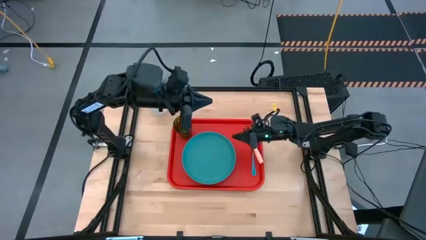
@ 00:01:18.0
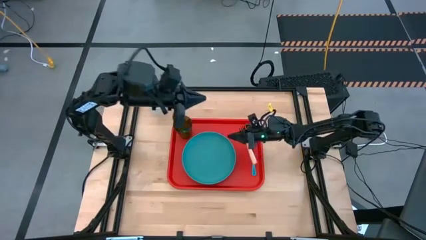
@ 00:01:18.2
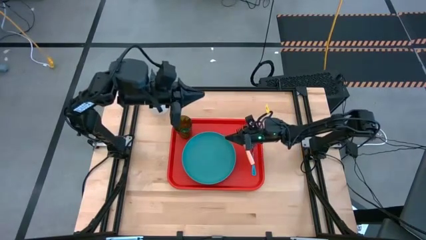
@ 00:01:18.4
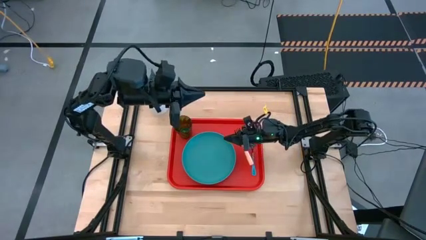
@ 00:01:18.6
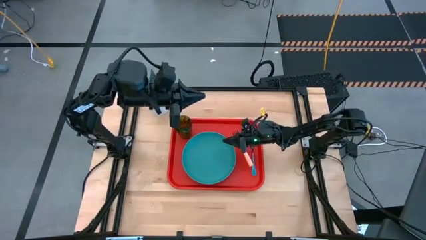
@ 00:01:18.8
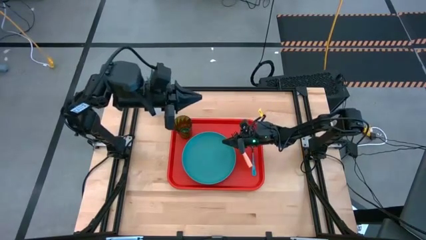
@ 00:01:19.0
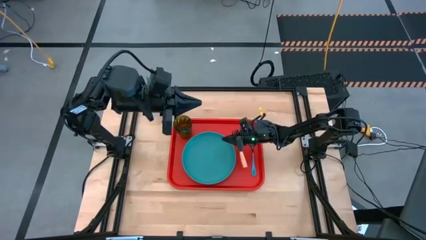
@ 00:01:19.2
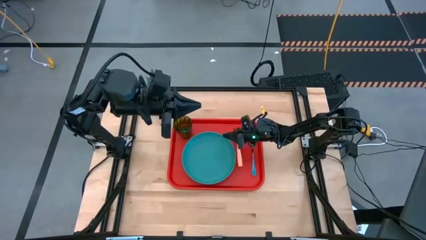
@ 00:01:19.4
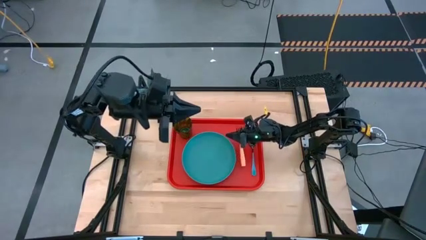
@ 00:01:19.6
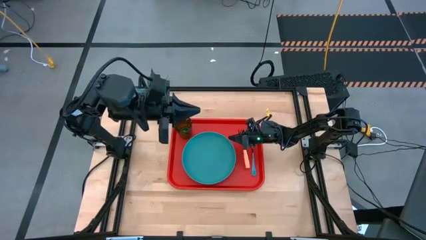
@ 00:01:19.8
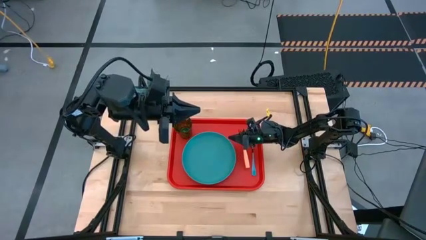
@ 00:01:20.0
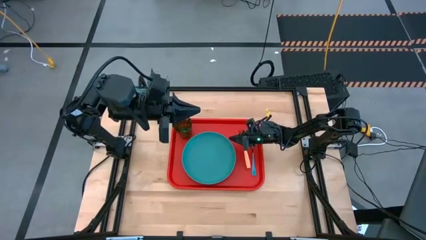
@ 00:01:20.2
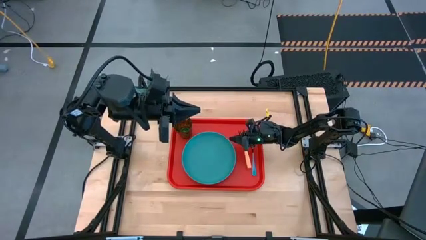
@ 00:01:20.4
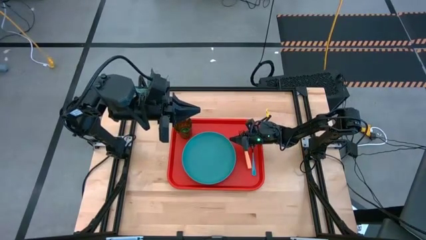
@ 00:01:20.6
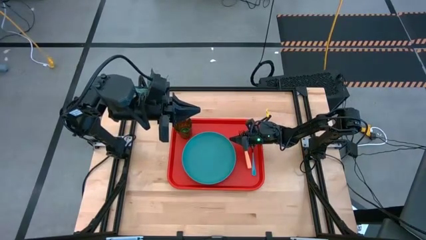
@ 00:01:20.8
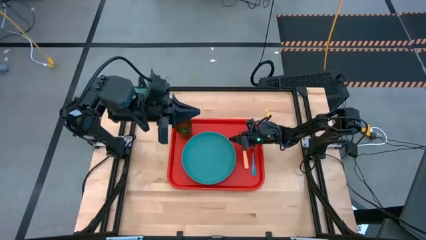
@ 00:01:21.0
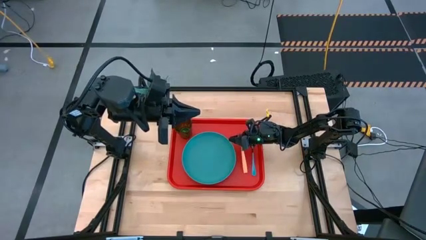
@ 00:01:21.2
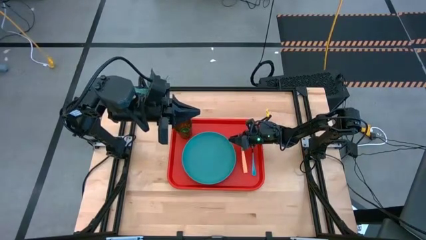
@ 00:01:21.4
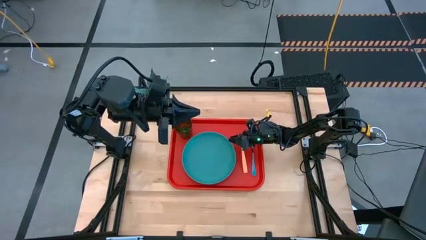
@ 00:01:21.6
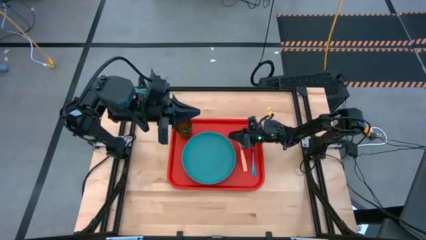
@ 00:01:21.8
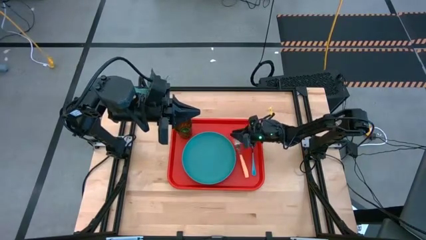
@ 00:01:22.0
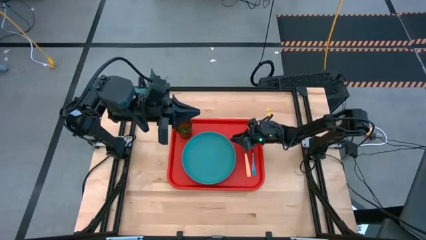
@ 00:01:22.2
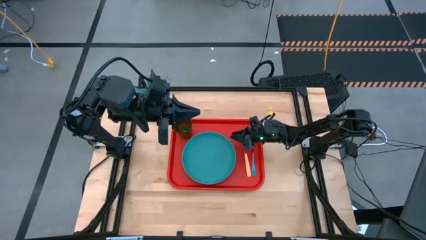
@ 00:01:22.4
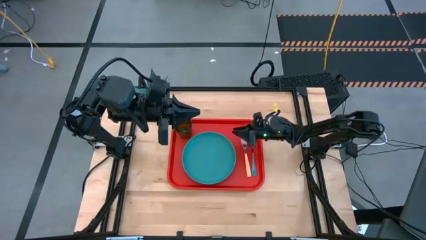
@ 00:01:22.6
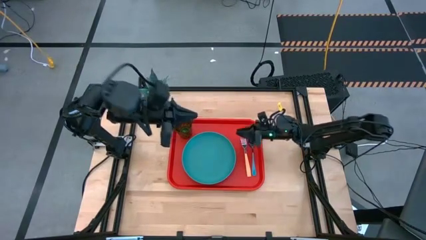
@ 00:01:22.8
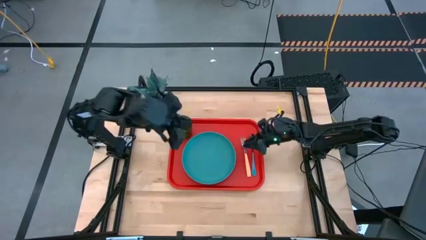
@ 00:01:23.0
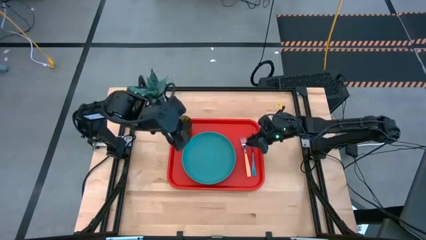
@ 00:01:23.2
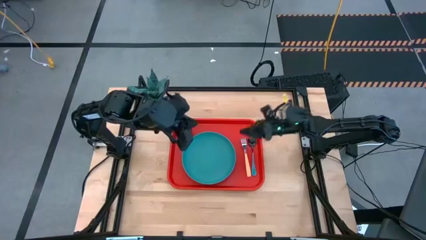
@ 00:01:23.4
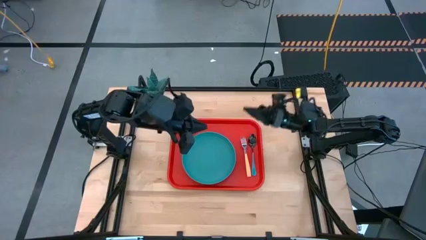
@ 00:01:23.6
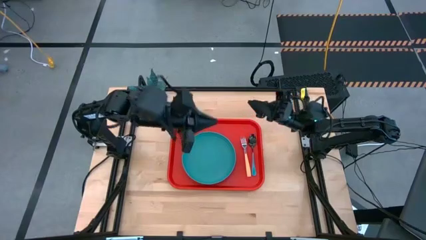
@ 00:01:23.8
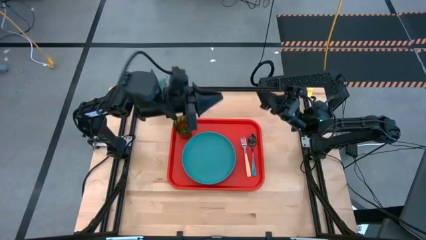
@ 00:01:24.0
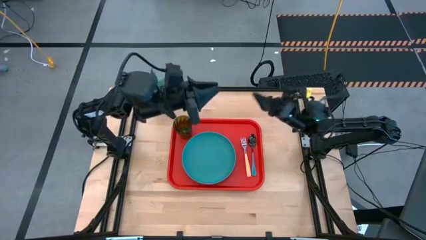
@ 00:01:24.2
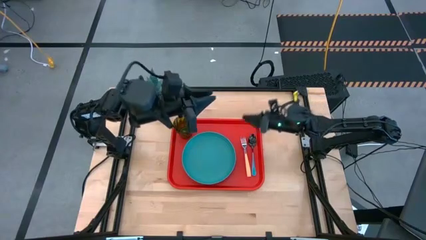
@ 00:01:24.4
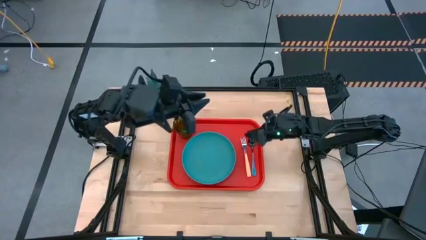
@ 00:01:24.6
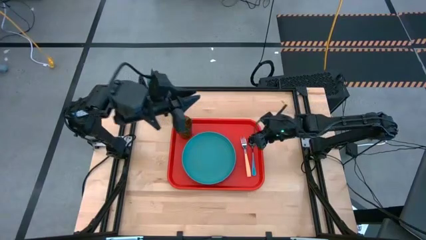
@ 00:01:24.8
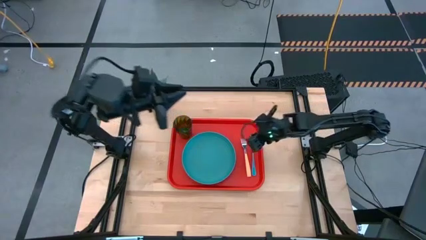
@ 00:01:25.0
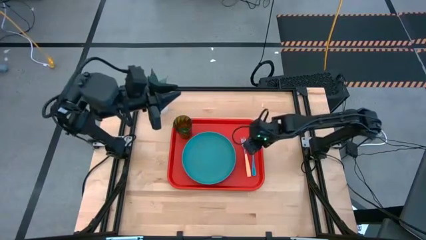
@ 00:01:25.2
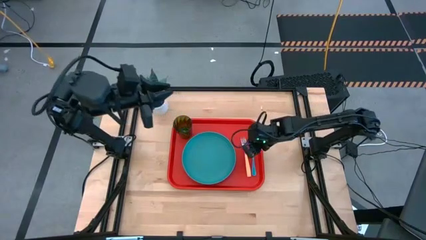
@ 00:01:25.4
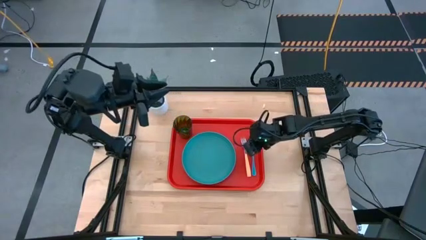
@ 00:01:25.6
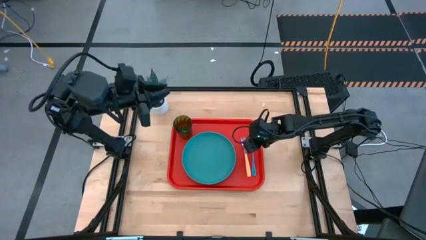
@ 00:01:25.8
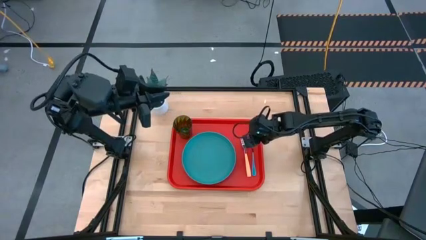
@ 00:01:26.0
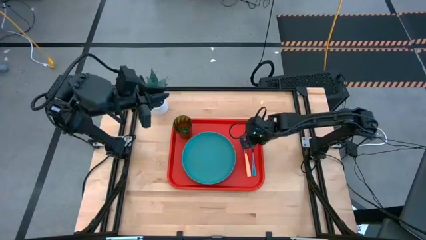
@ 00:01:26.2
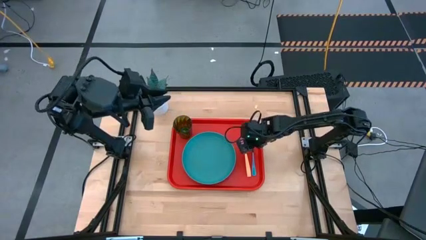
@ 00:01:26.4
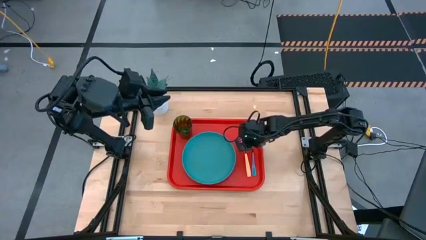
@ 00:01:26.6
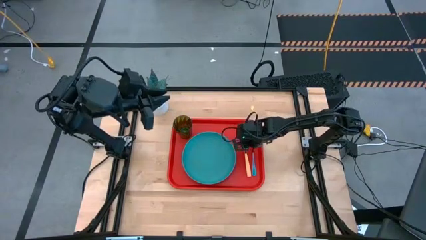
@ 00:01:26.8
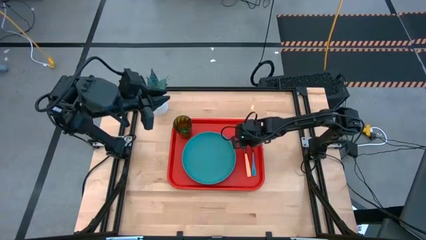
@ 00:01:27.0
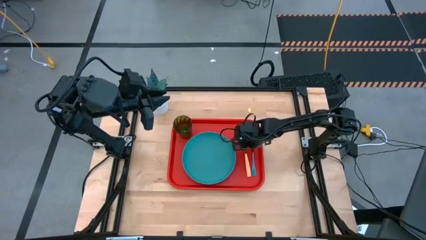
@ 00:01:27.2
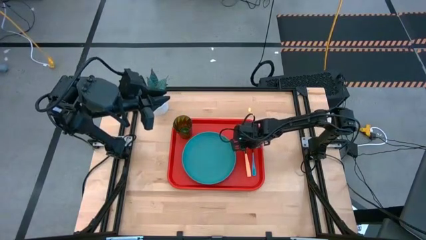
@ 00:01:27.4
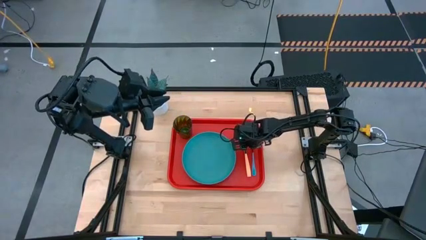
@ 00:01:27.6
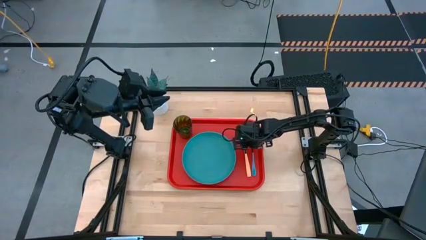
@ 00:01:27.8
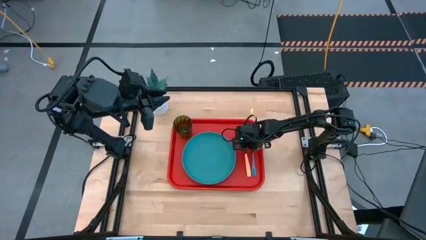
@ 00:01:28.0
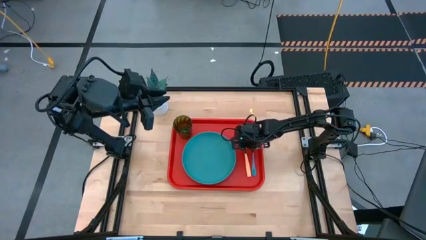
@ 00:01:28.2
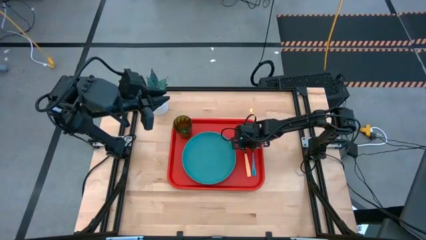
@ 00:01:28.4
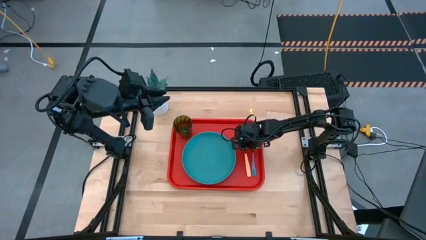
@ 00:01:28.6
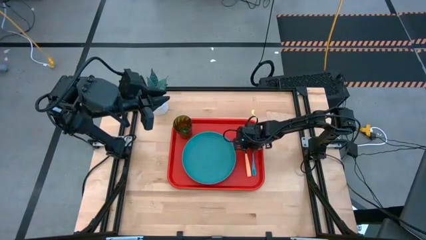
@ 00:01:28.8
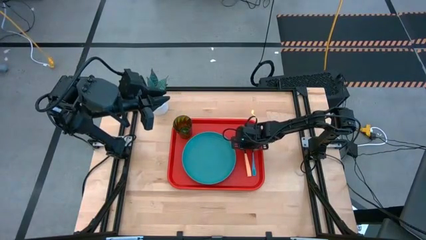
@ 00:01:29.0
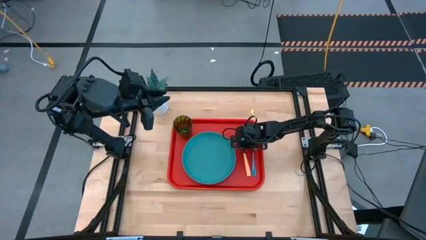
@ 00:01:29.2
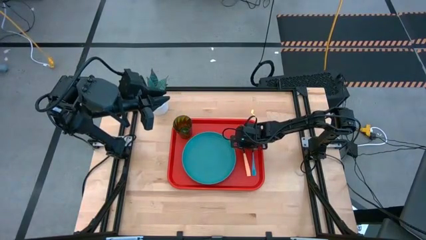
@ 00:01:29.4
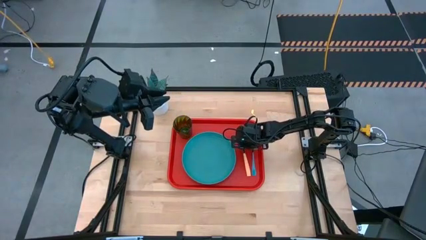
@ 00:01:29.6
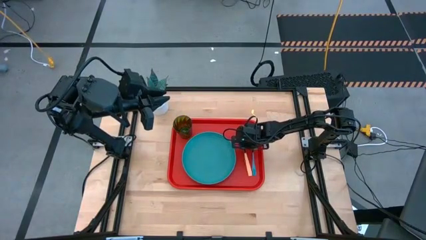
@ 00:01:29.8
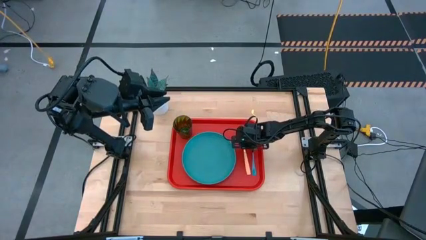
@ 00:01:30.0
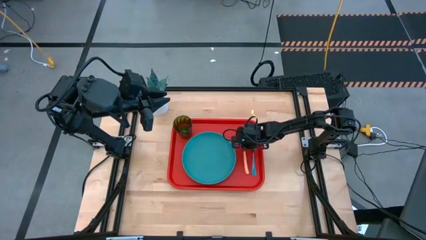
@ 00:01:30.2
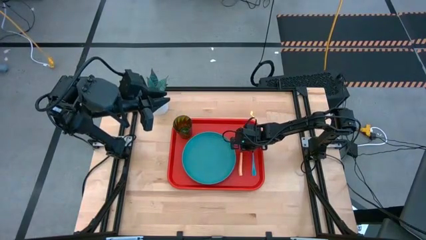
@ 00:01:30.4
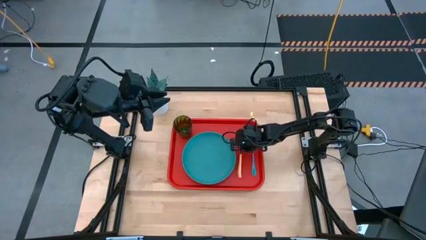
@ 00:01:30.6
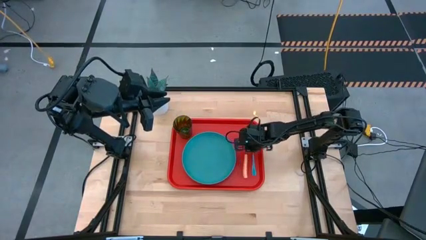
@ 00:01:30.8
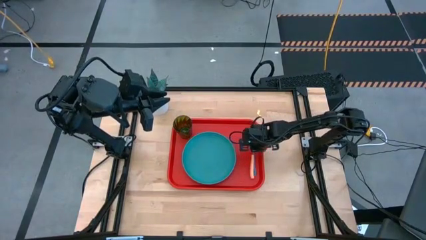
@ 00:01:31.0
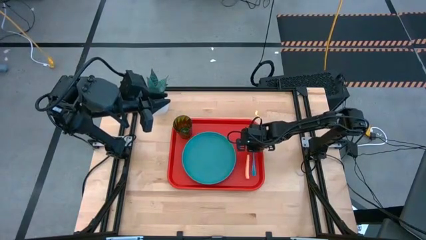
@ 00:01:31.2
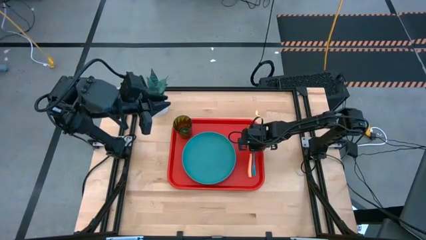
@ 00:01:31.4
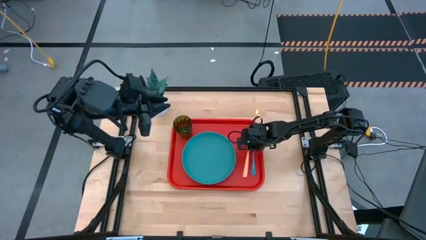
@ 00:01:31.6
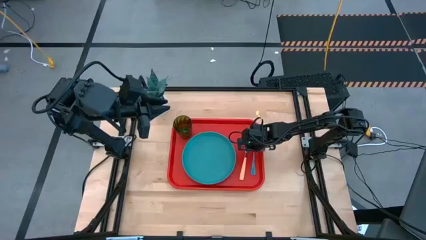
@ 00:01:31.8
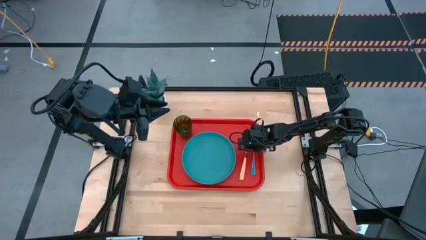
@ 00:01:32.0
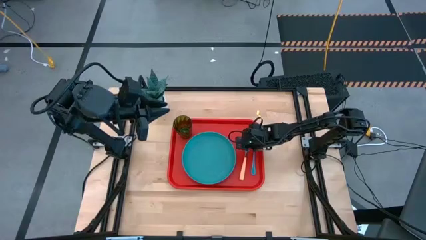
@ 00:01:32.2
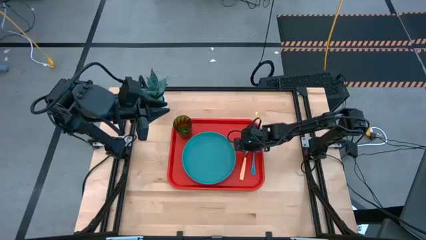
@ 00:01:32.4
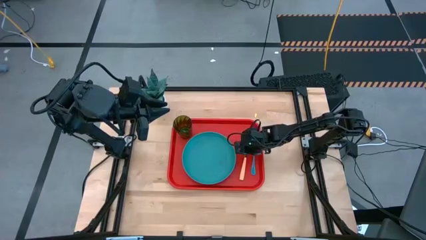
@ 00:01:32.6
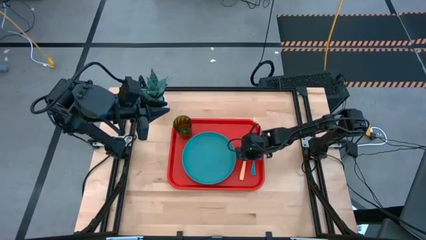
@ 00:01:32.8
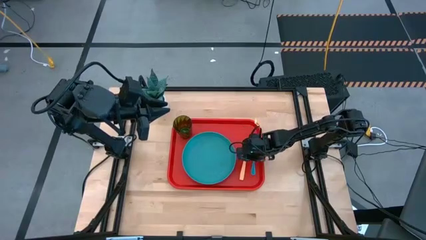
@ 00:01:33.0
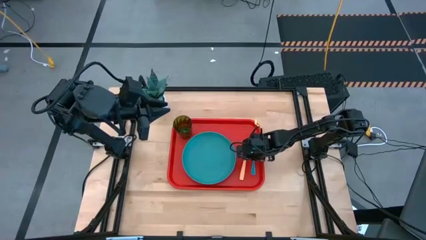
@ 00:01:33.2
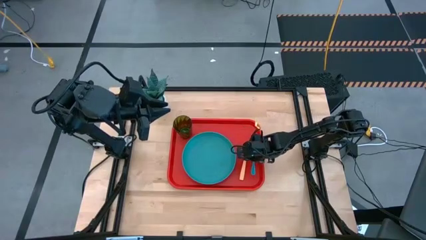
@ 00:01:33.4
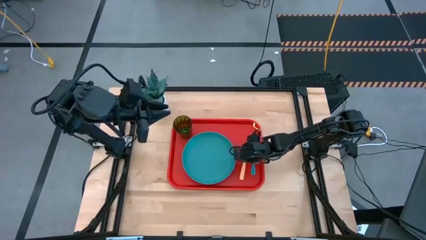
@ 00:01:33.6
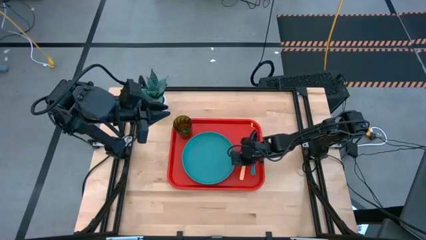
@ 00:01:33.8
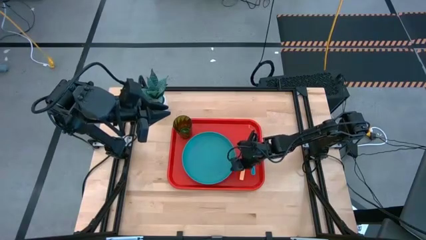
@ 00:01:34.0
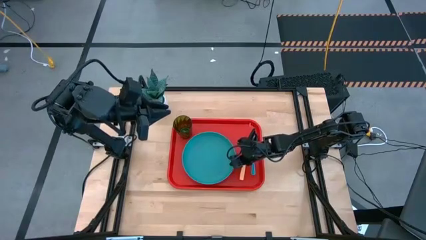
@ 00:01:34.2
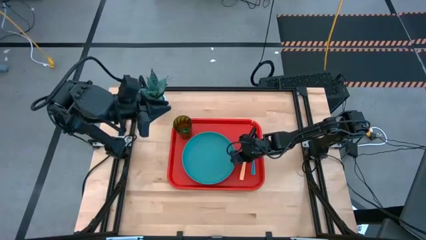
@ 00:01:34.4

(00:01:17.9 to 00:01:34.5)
Task: Pick and place plate/cup/fork/spoon on tray
Put the yellow fork on the red tray between the blue plate and the blue spoon
